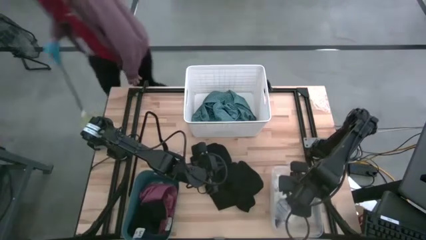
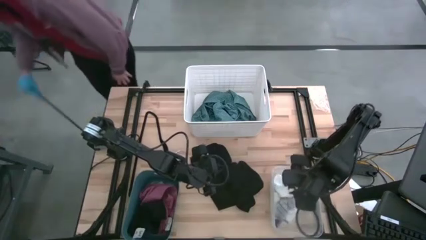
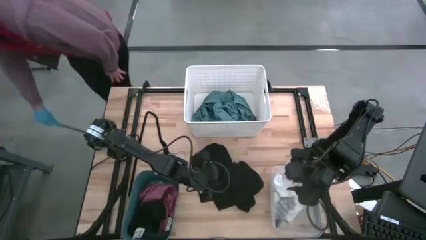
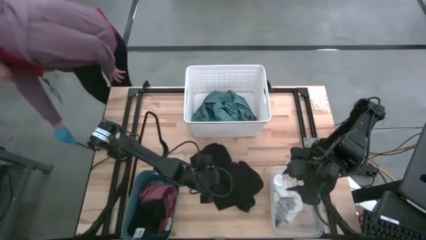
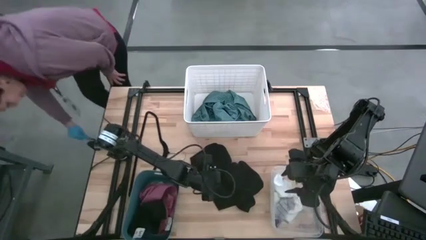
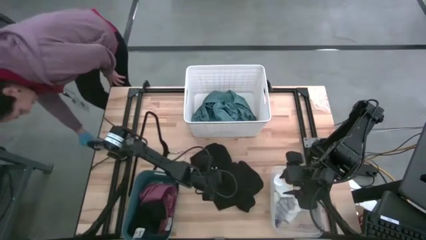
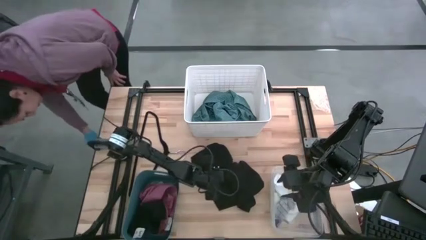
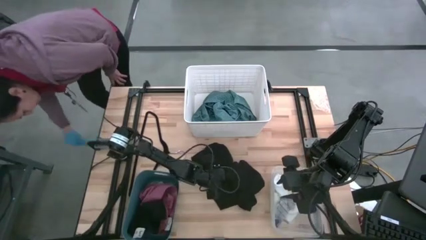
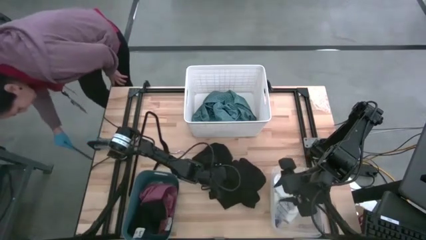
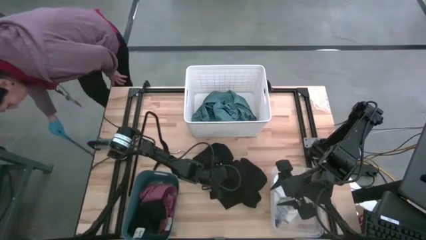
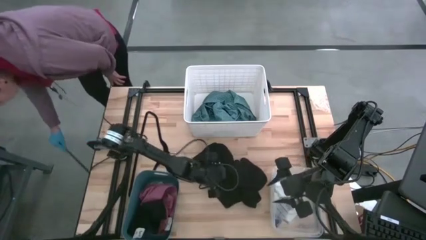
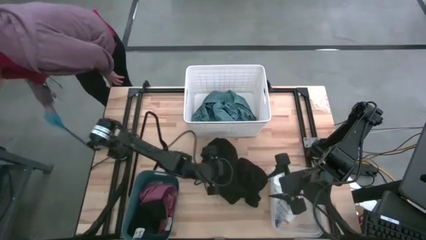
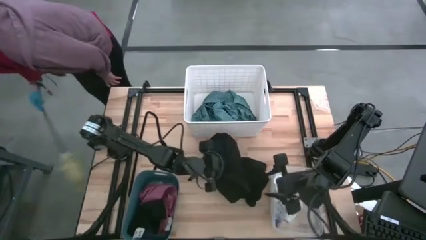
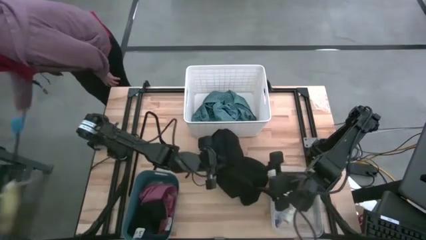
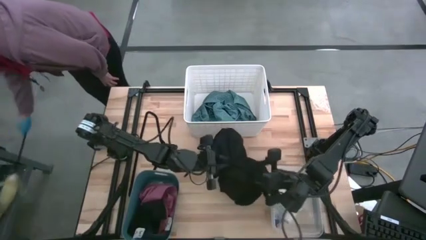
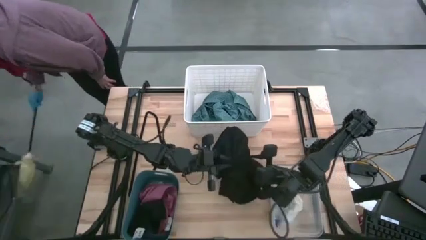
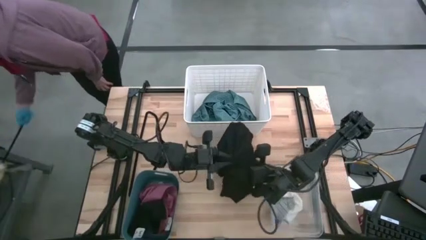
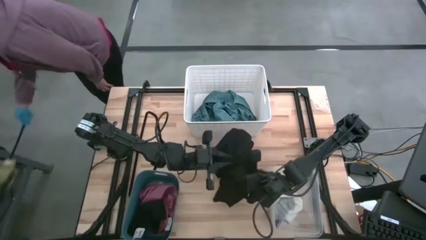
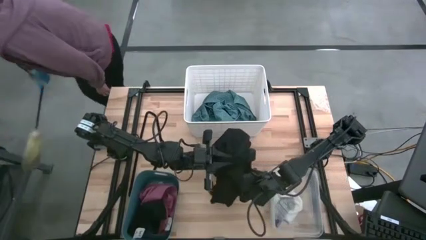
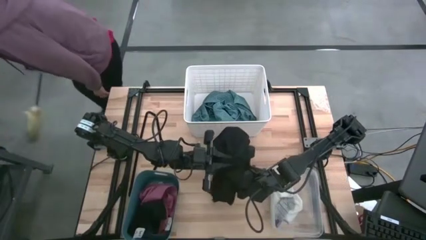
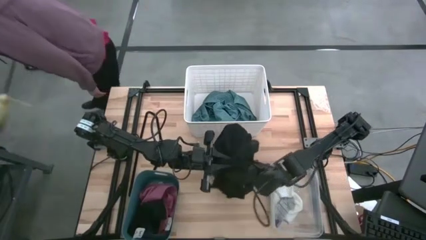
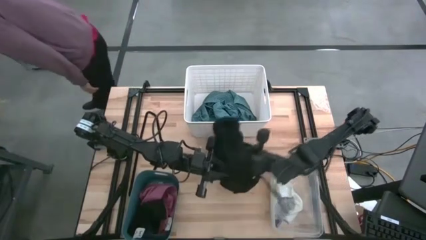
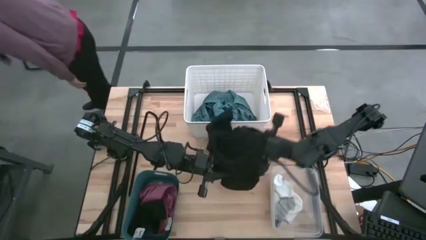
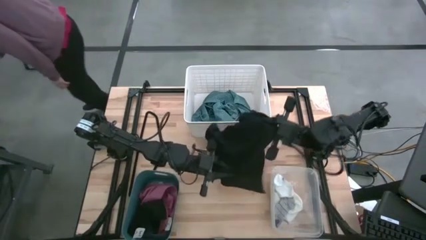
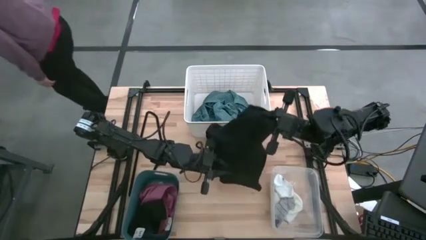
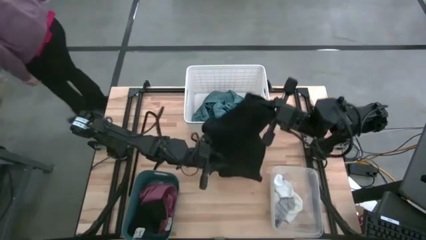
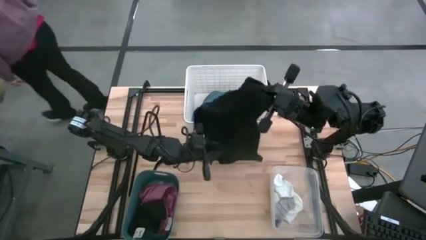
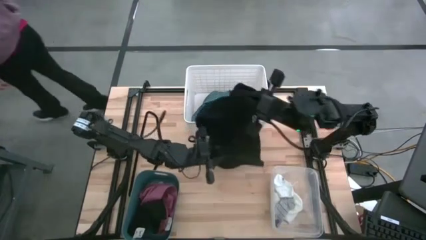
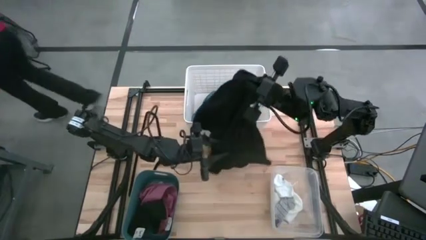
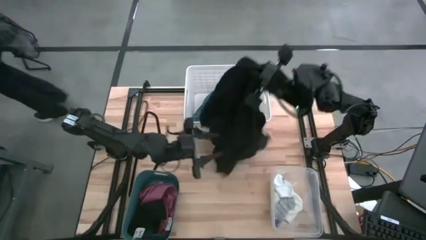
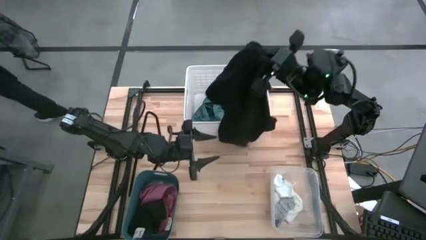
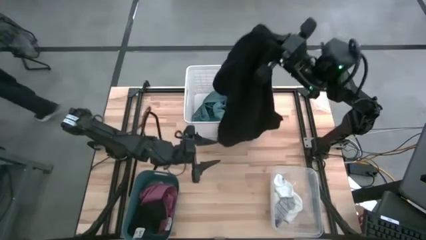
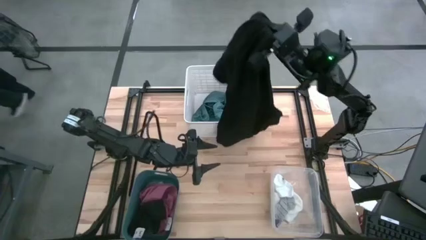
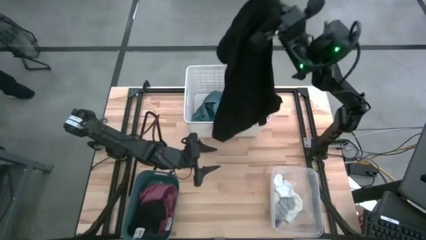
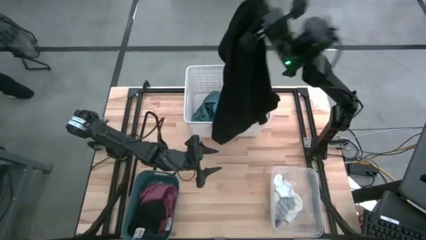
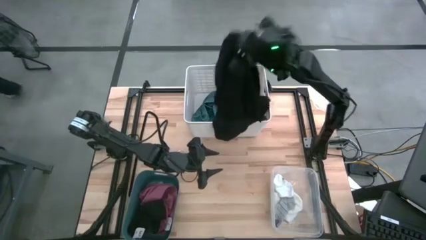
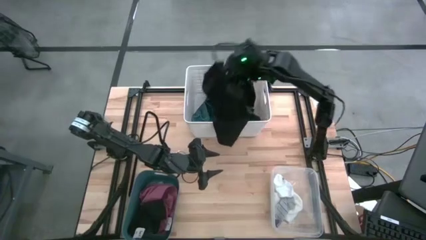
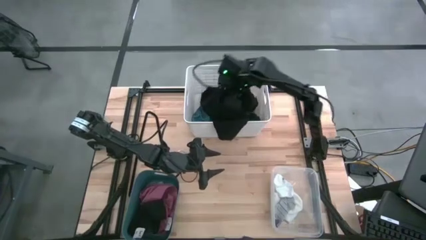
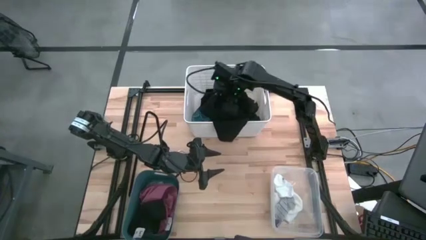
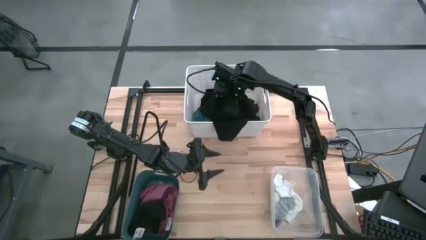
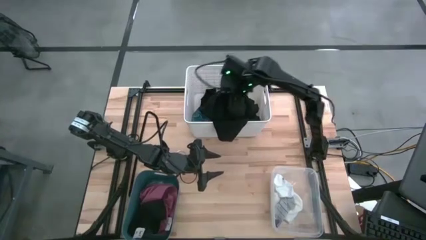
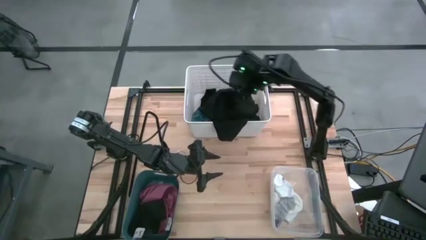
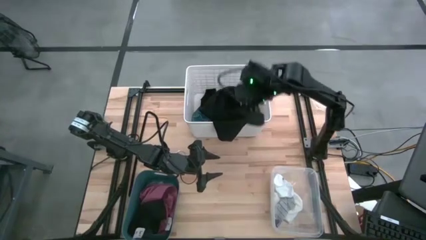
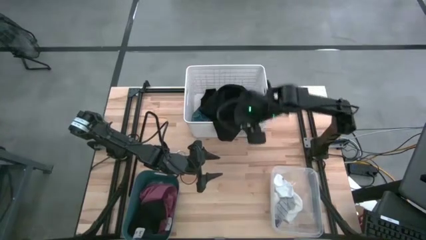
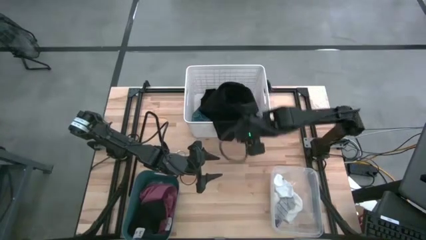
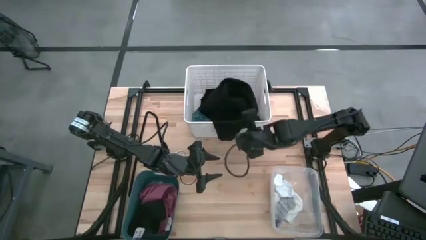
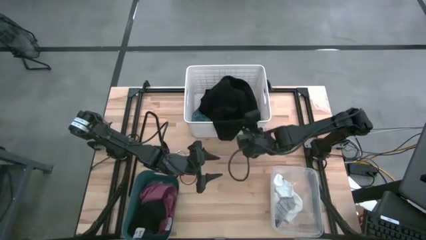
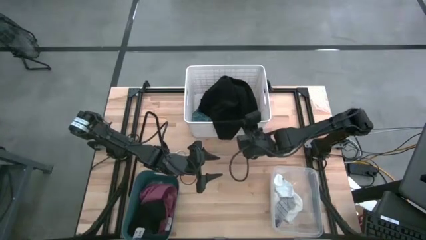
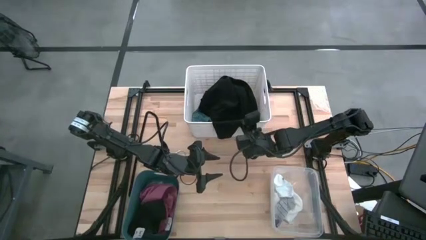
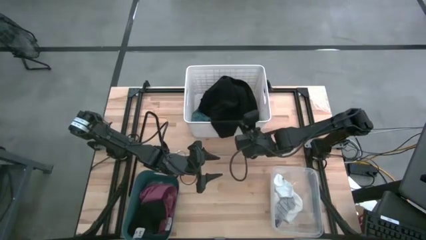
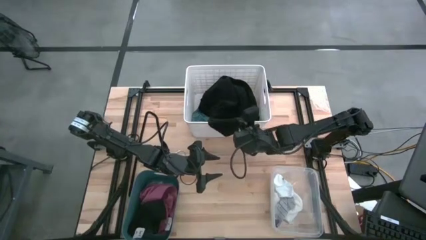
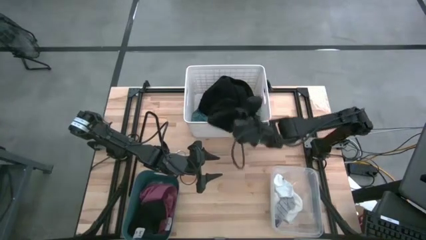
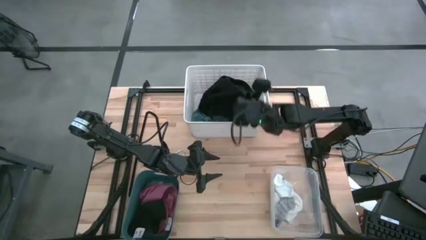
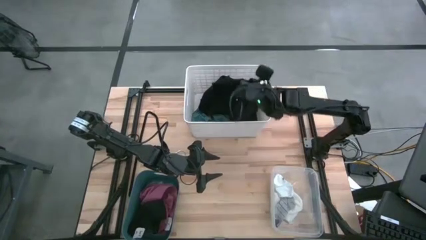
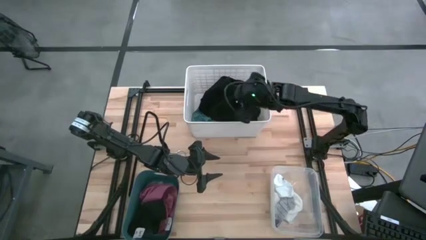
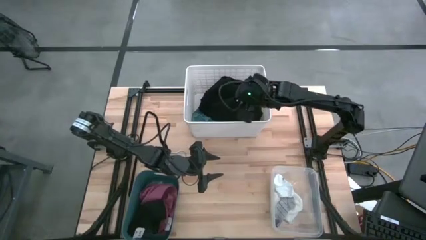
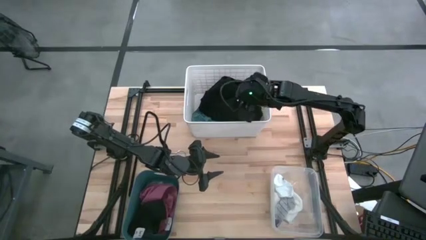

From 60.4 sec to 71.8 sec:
Task: Pick & Place Cloths
Put the black shirt into the white laundry bin

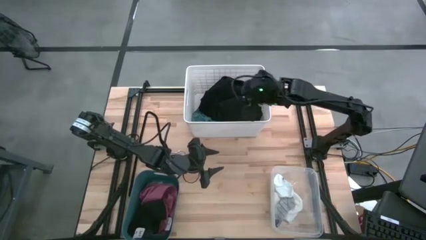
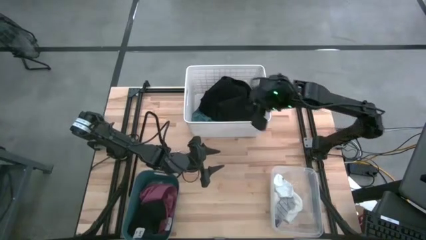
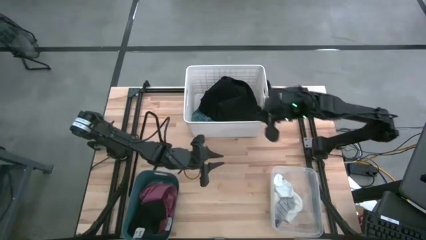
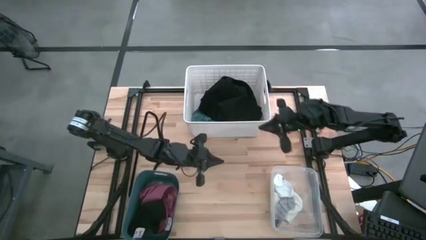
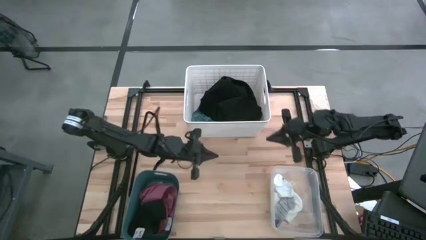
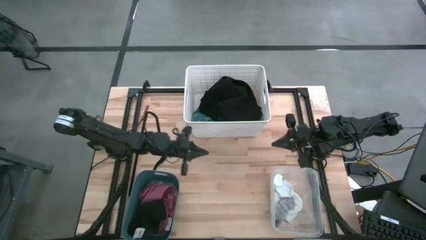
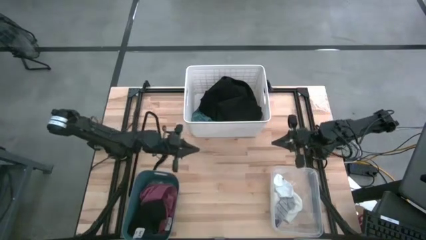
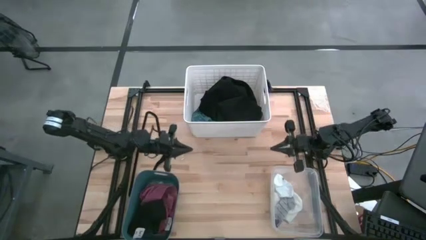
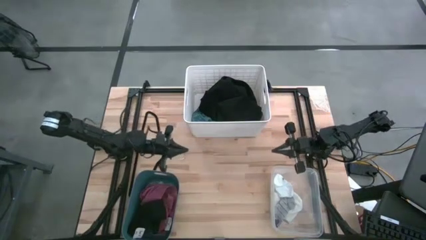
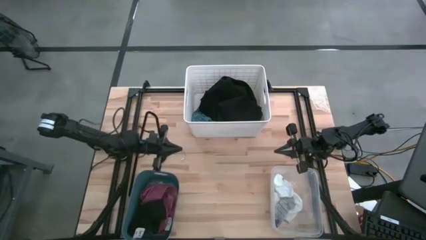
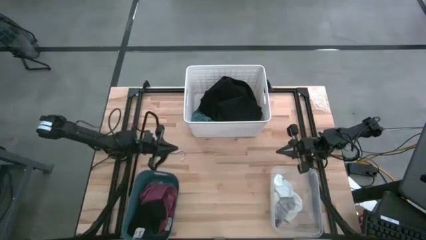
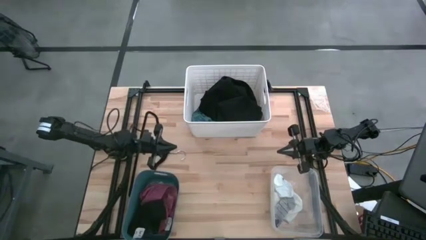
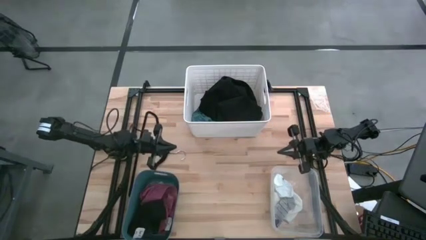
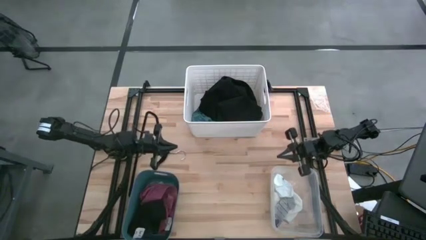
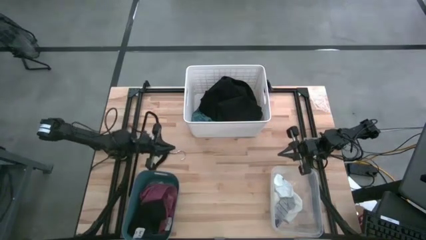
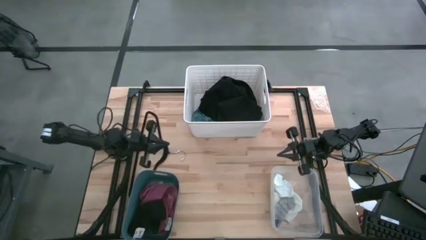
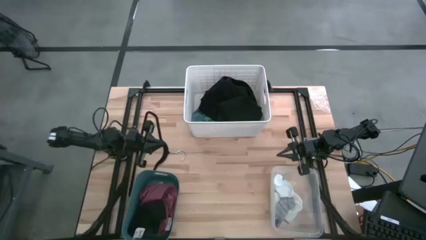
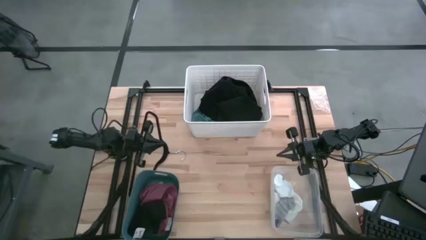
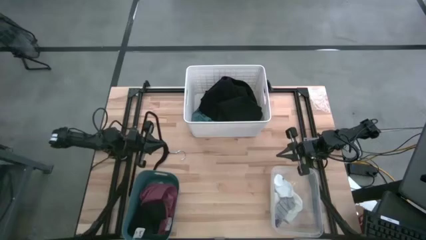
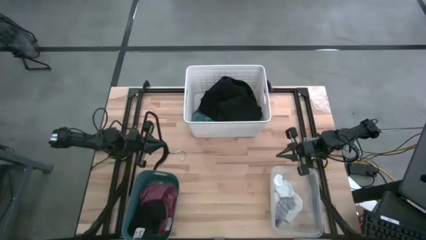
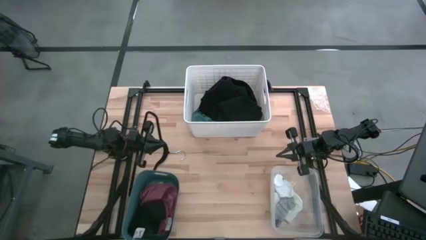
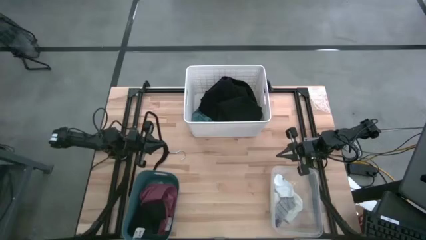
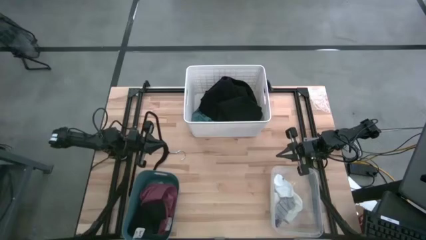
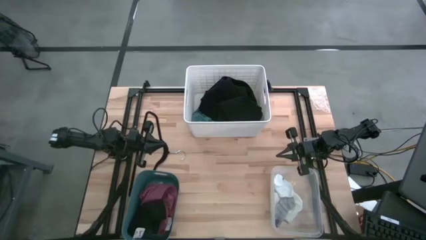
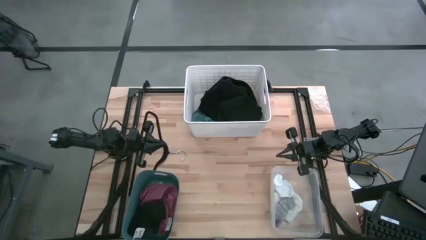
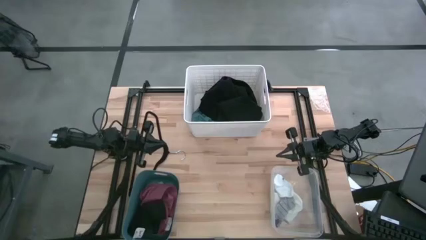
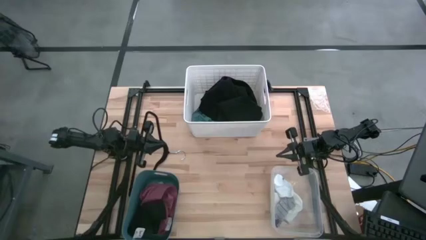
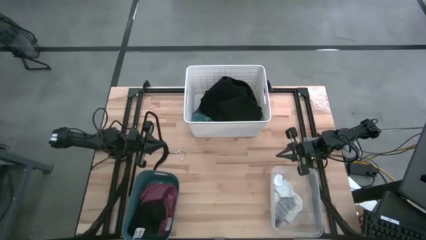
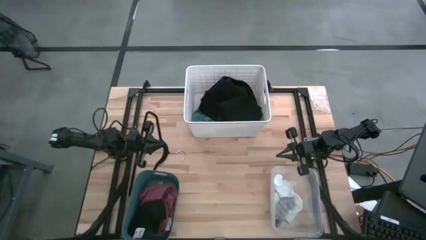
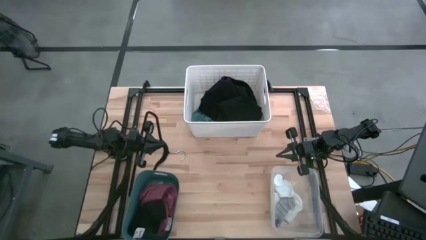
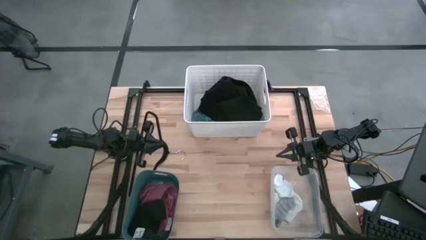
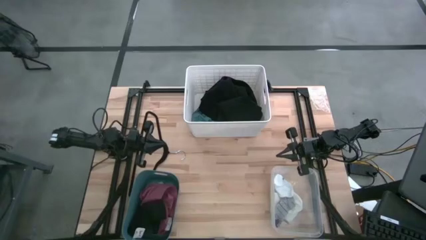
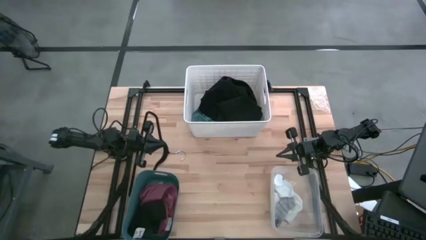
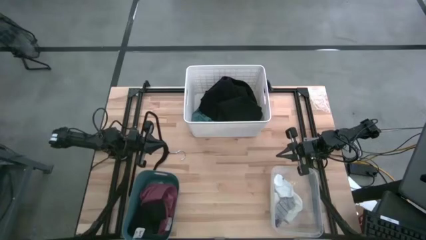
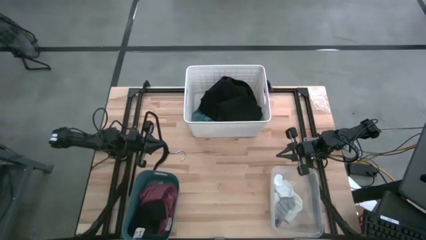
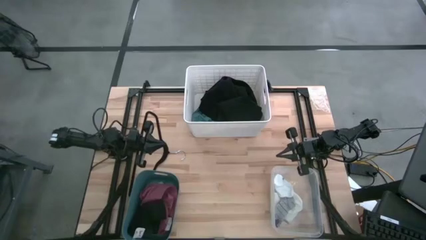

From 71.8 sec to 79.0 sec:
Return to Home Position
